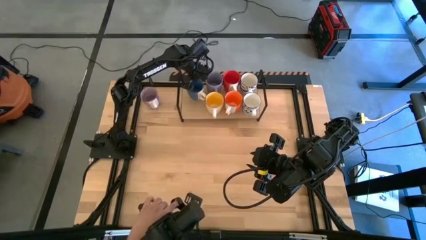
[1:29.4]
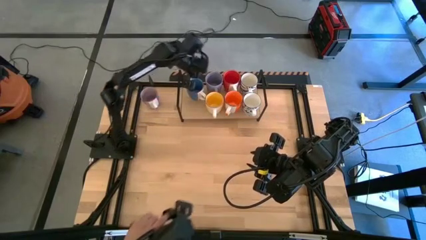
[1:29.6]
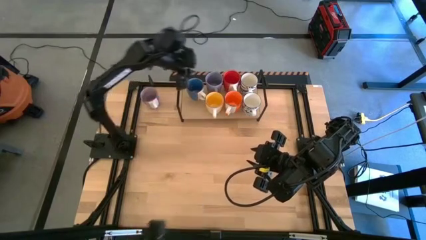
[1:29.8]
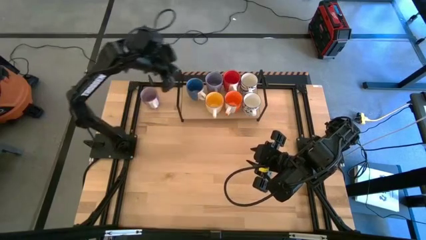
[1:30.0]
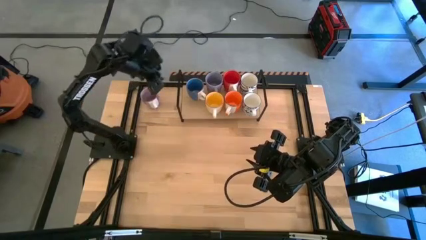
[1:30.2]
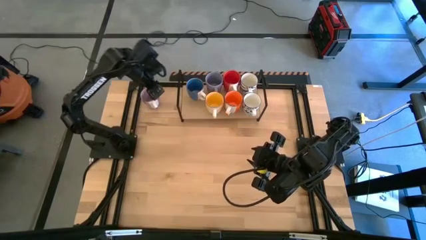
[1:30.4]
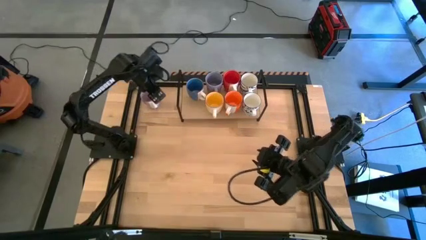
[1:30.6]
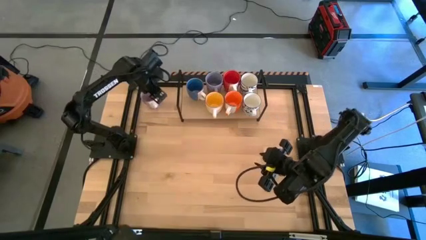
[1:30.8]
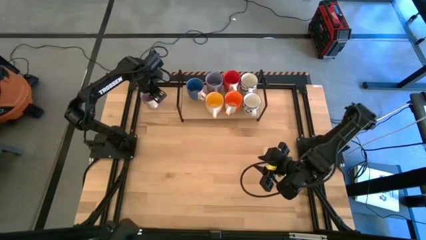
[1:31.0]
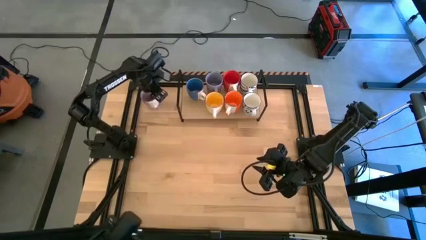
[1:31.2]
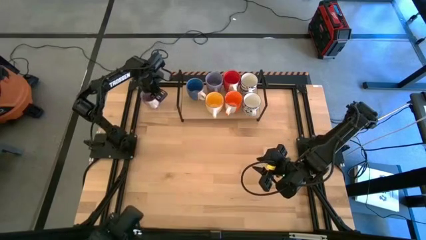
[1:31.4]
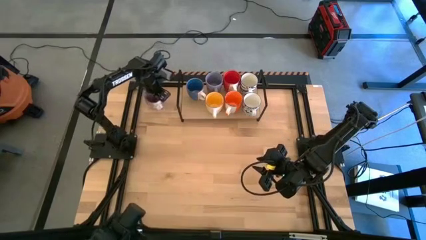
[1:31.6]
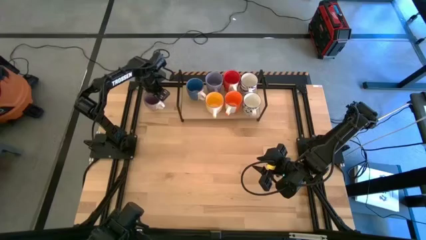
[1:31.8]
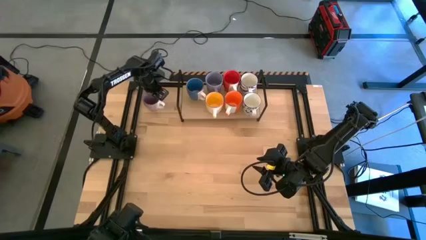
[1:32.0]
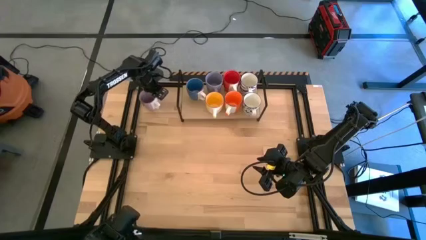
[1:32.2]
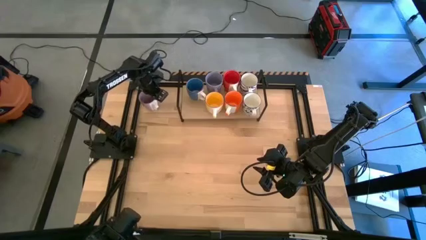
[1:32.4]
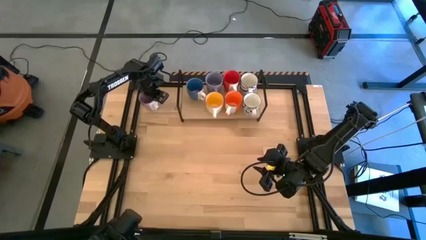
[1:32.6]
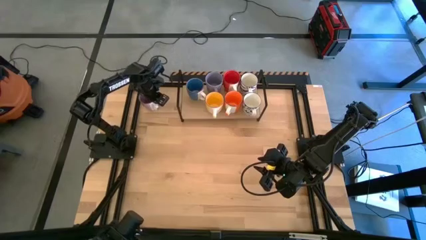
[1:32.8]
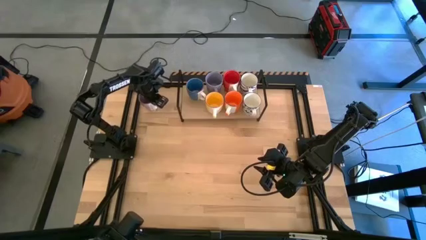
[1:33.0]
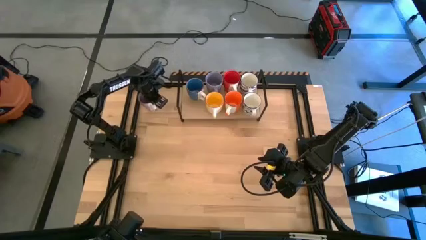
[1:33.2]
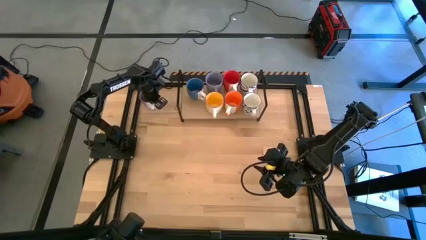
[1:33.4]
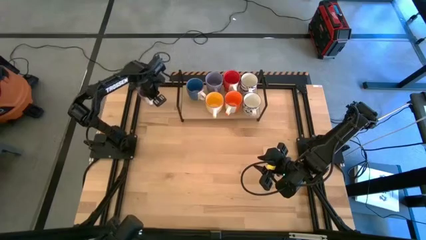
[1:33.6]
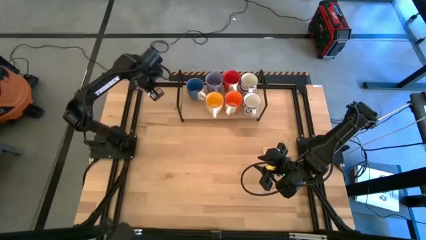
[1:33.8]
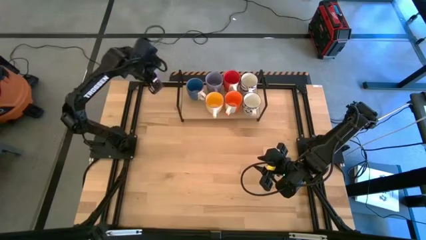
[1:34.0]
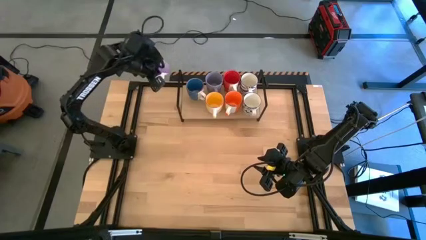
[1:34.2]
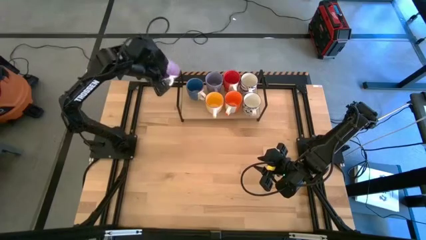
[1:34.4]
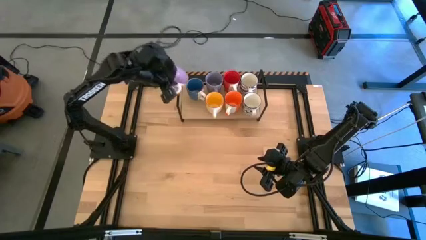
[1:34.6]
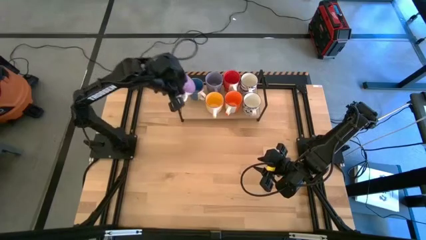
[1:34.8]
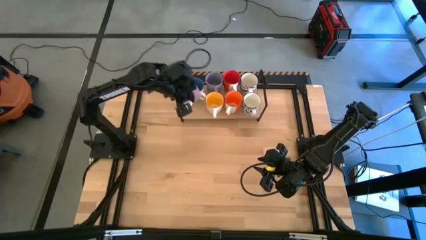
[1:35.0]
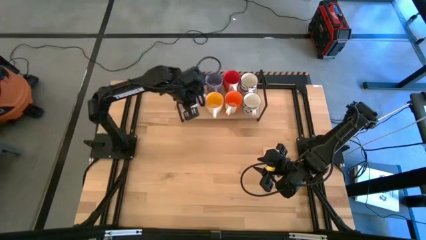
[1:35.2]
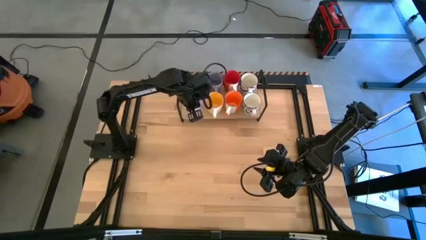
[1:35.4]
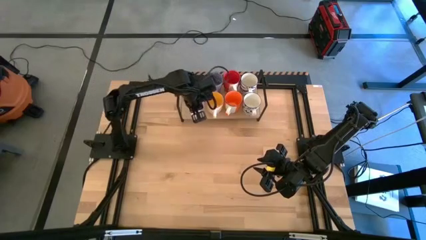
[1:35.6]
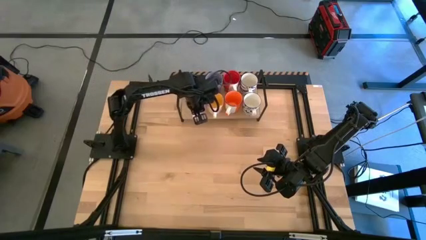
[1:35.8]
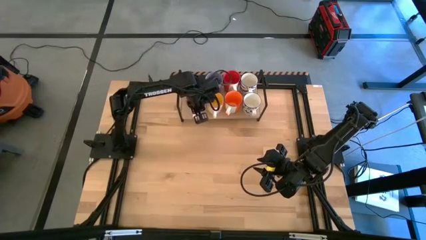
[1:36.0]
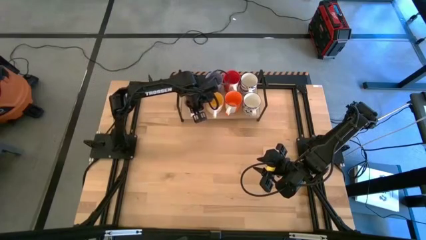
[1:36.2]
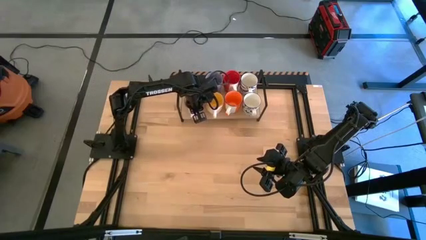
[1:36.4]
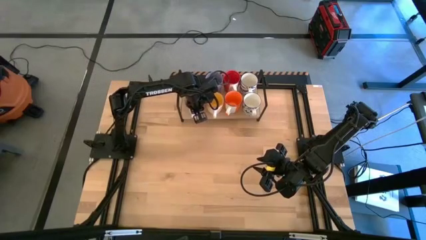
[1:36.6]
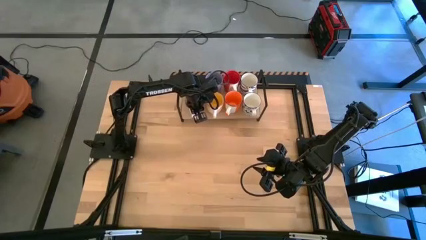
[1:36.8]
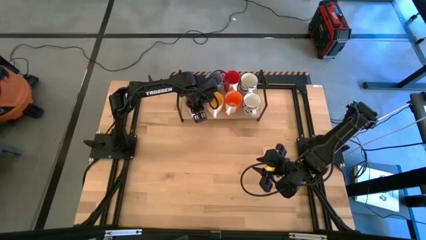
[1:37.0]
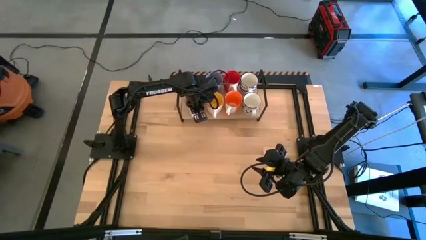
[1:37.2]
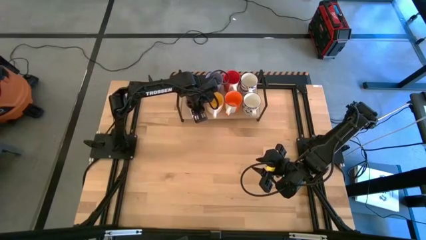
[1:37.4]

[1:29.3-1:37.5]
Task: Place coffee mugs
Put the purple patterned mug on the shelf

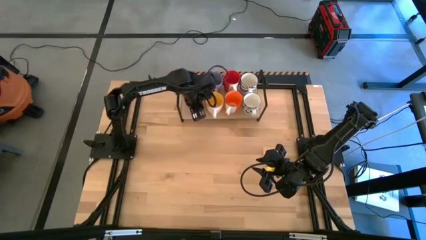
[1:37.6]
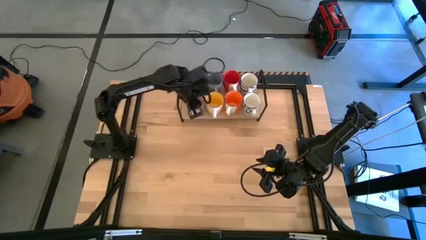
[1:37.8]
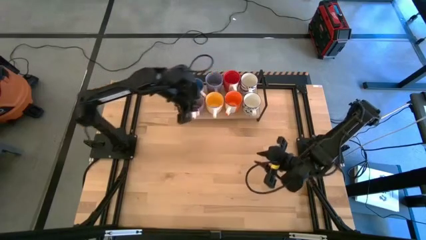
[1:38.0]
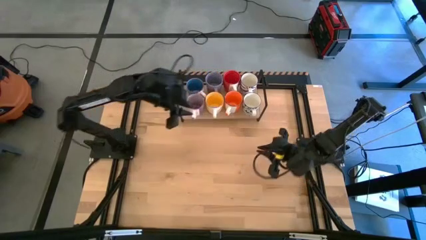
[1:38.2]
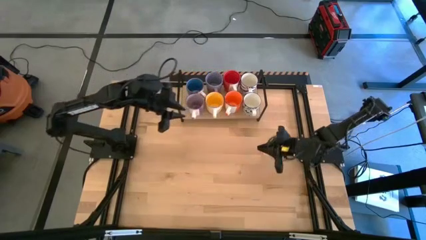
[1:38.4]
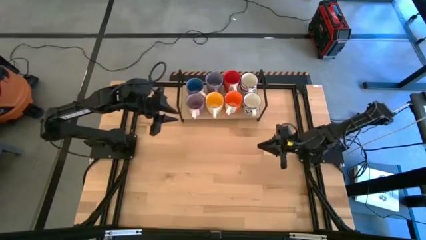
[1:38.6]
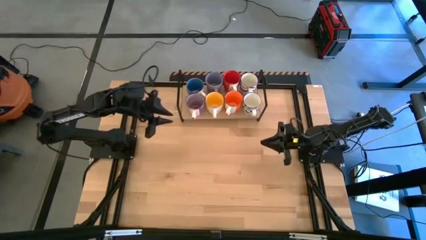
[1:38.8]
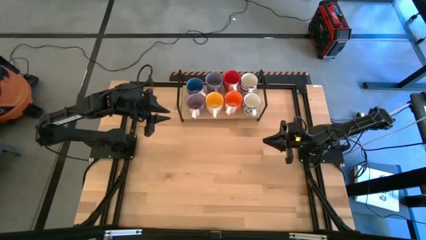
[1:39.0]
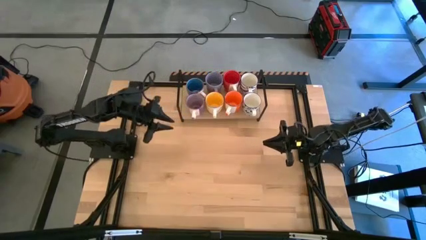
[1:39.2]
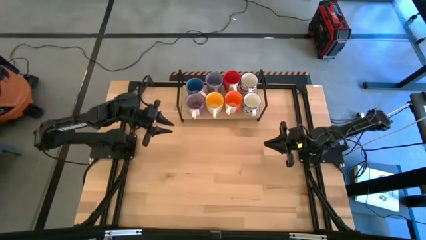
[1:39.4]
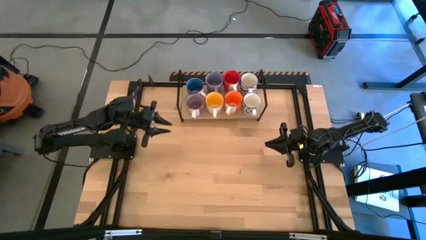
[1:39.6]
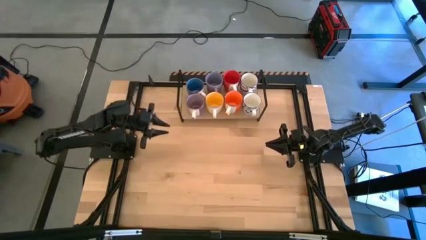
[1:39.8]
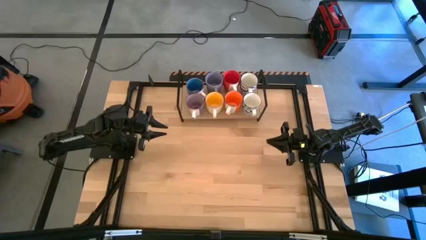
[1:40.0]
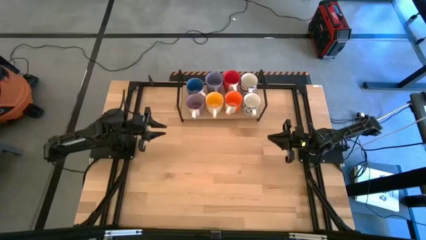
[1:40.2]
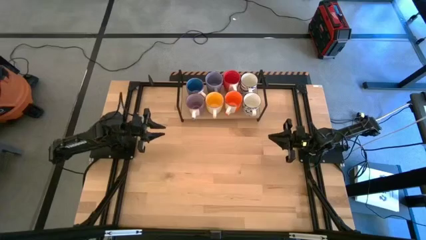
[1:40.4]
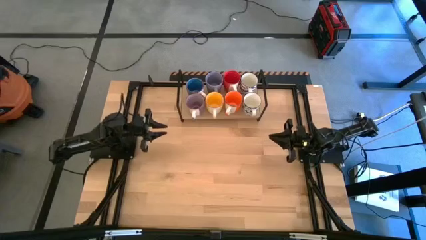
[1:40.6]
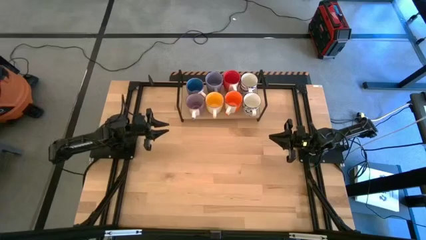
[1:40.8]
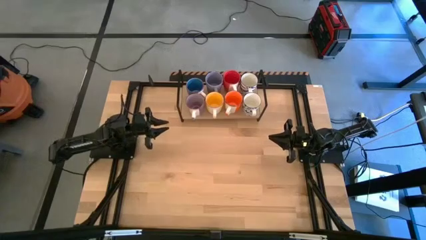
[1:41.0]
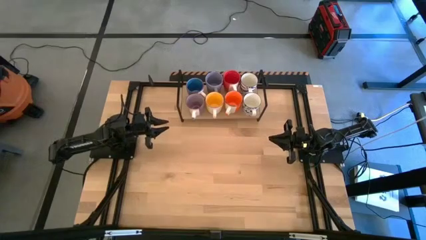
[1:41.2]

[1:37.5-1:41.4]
Return to Home Position

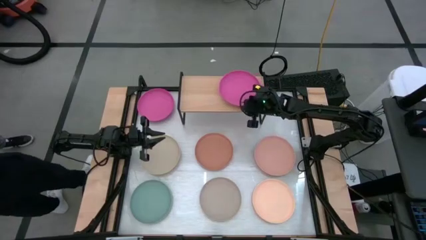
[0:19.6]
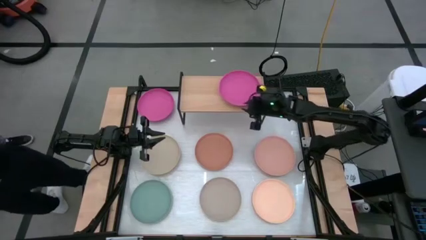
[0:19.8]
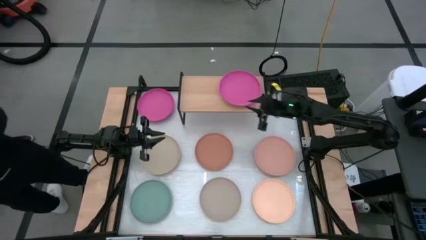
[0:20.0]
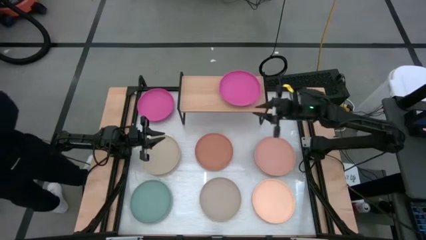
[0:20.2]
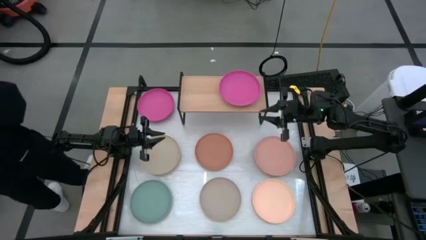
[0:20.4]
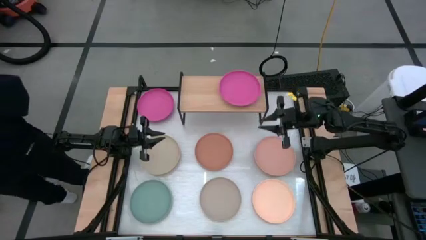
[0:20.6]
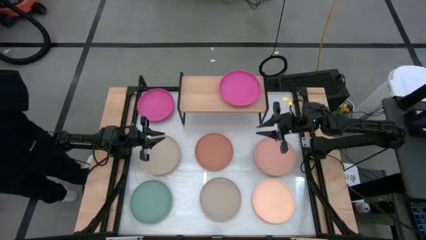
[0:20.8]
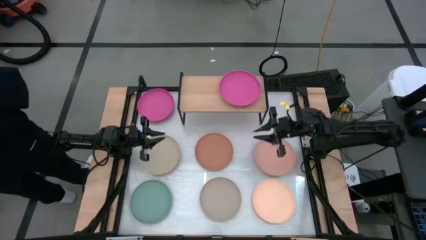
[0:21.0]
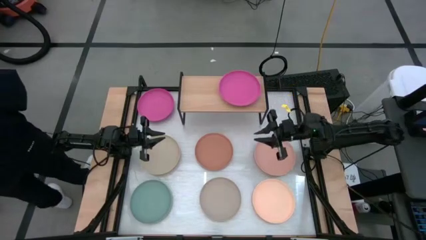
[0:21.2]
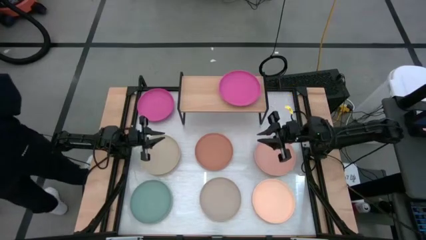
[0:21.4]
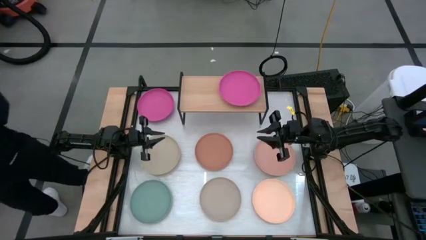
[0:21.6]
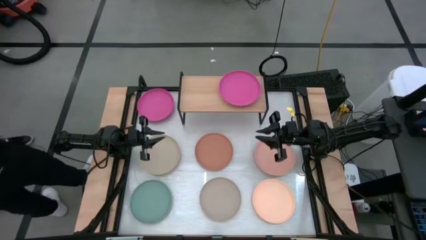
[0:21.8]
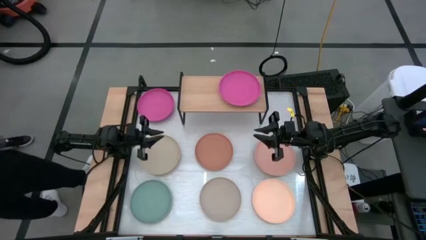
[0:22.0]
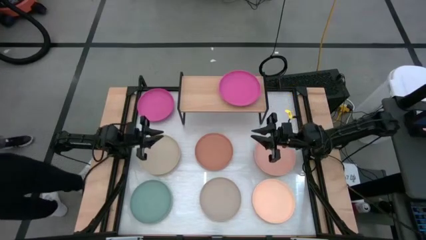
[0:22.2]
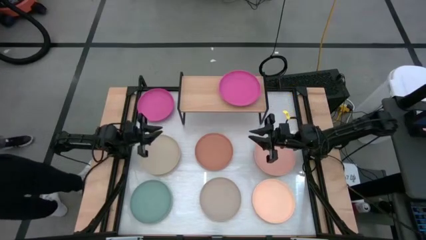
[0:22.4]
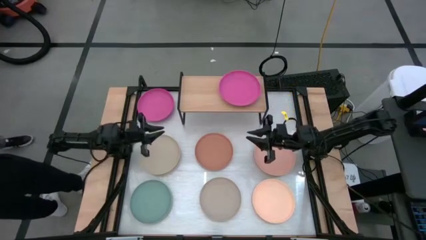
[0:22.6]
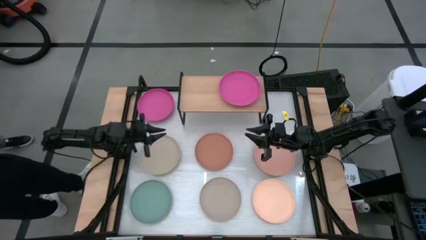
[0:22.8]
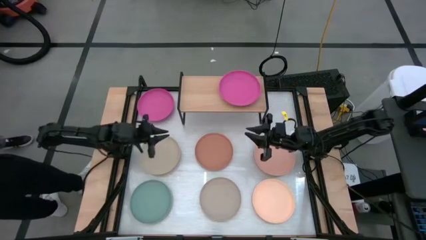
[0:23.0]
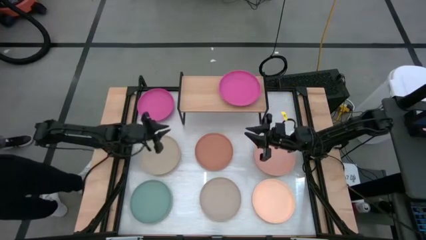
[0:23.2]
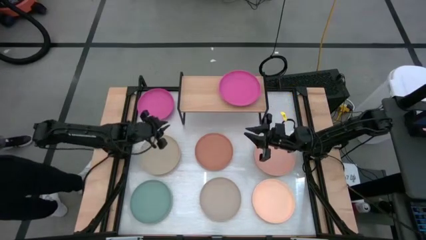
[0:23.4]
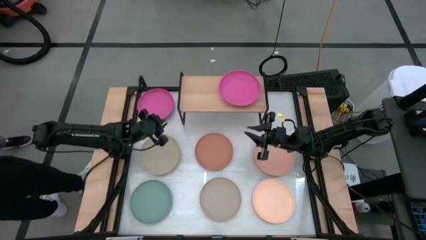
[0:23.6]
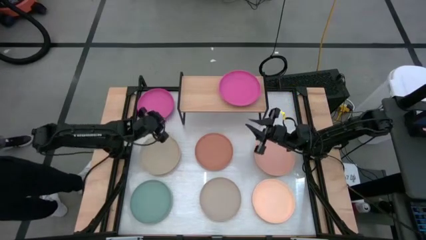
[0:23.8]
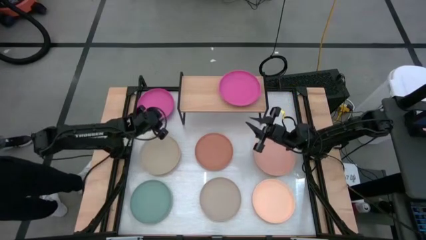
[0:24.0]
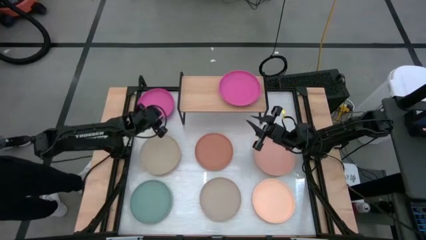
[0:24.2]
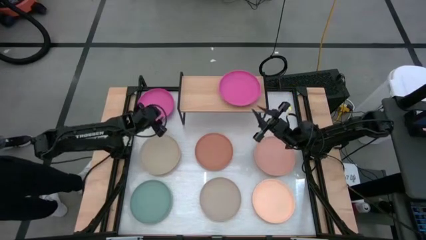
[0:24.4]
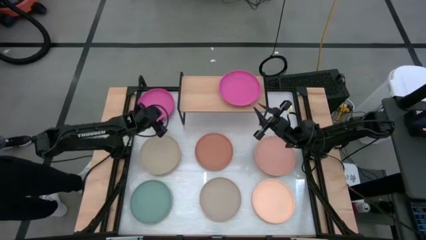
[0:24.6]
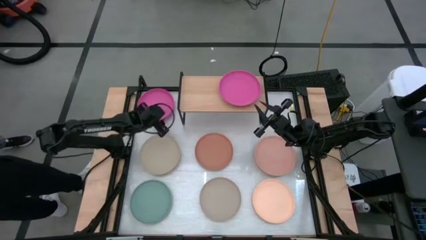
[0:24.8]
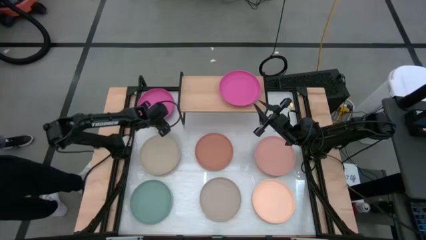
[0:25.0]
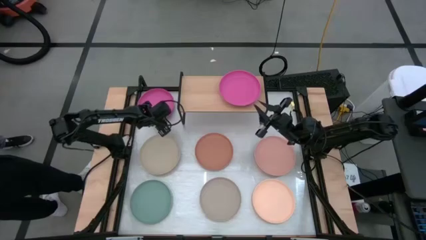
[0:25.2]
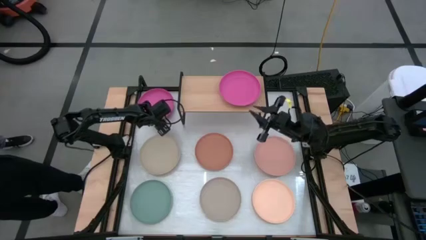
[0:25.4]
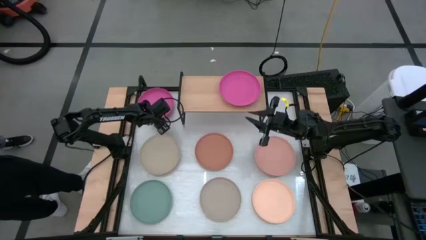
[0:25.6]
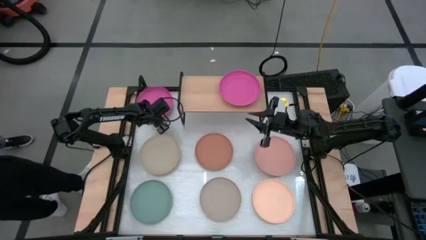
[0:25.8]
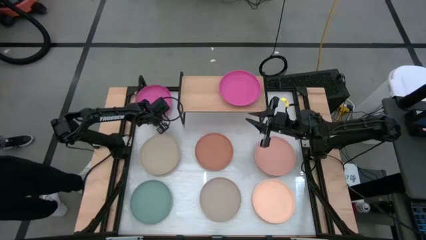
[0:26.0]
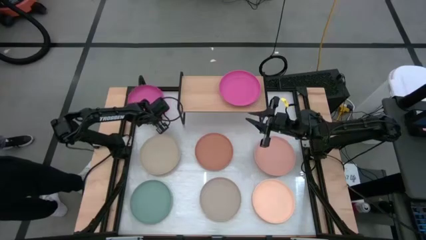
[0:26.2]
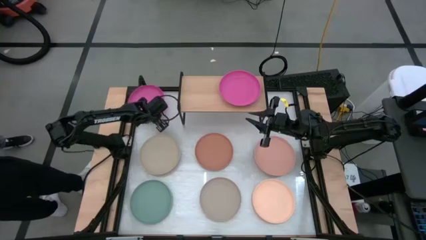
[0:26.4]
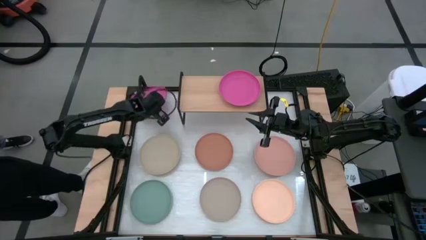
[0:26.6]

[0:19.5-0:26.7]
Task: Place and stack plates onto a shelf
Stack the pink plate on top of the pink plate on the shelf
